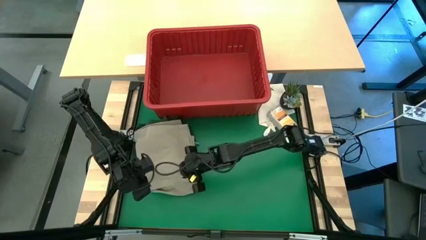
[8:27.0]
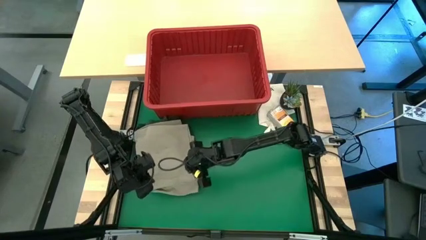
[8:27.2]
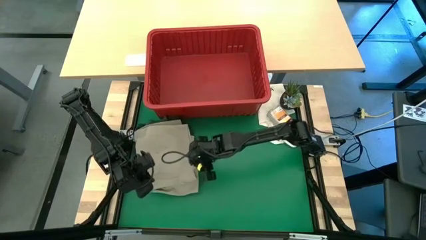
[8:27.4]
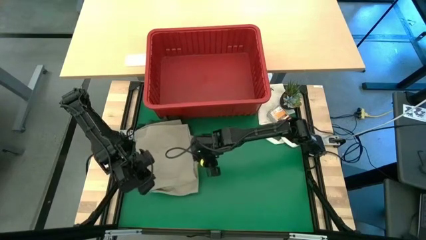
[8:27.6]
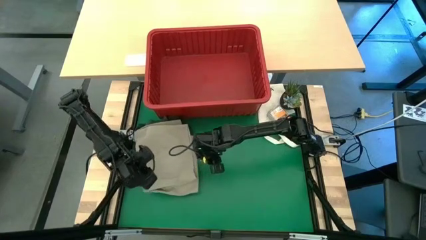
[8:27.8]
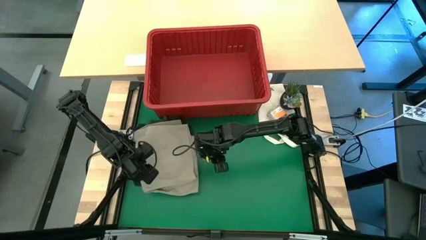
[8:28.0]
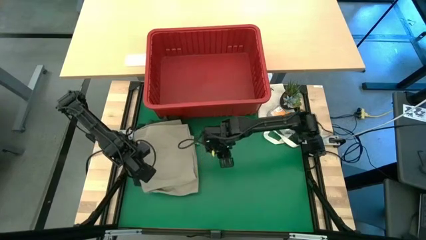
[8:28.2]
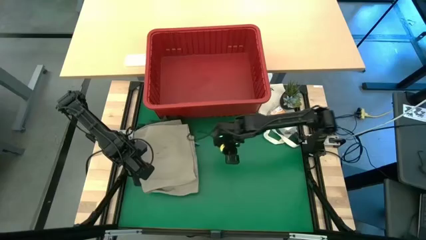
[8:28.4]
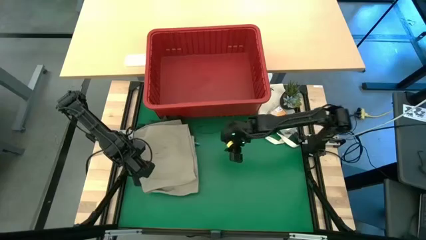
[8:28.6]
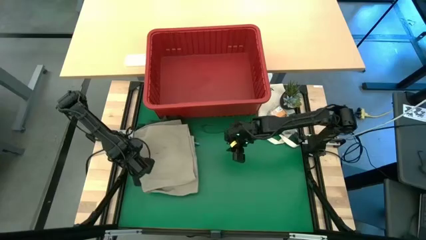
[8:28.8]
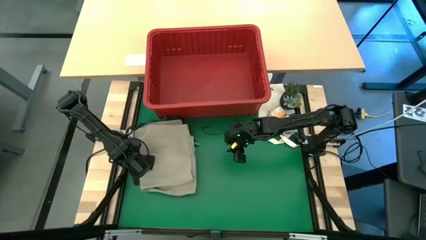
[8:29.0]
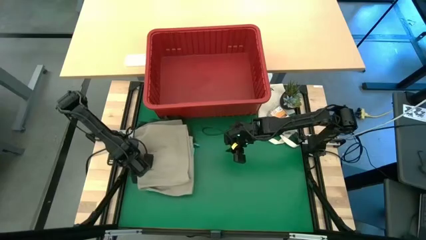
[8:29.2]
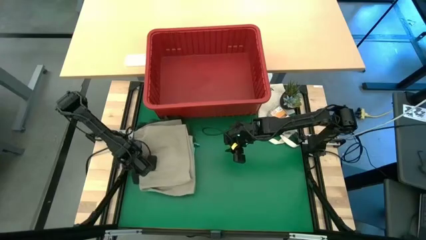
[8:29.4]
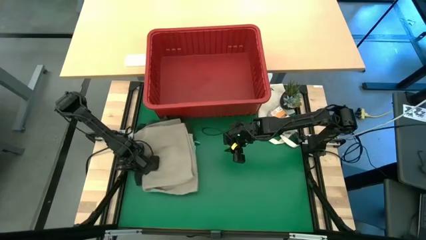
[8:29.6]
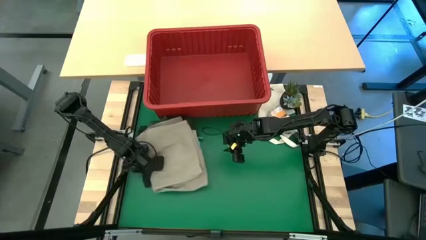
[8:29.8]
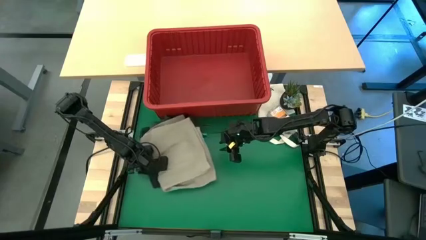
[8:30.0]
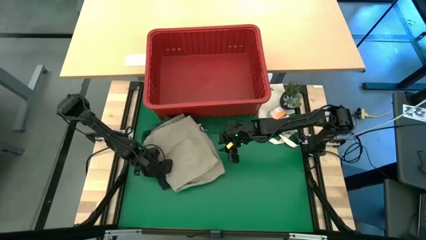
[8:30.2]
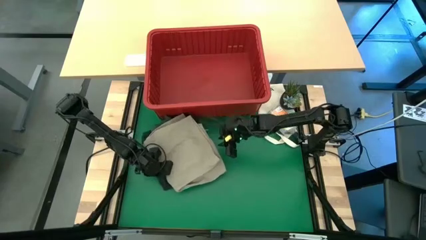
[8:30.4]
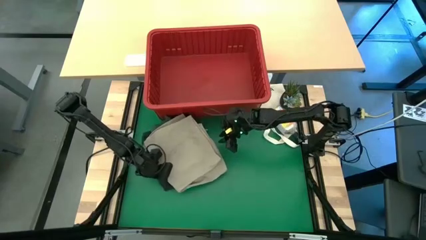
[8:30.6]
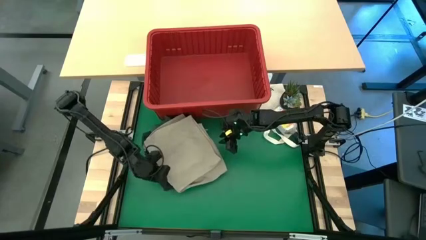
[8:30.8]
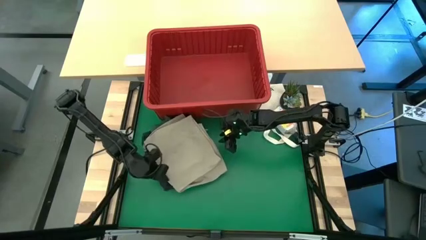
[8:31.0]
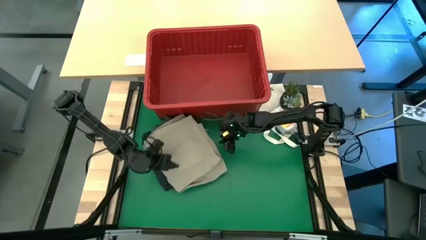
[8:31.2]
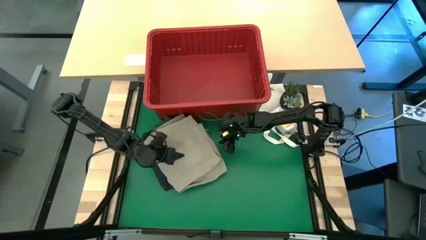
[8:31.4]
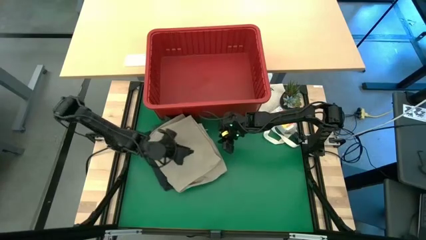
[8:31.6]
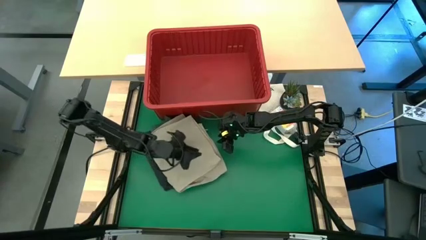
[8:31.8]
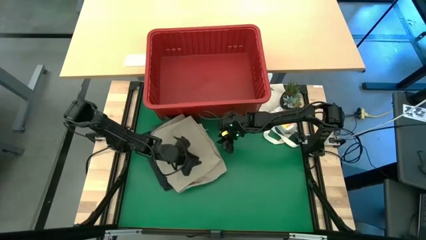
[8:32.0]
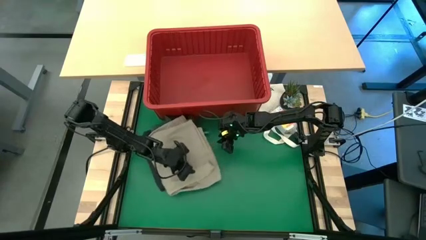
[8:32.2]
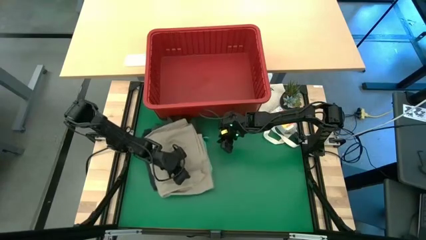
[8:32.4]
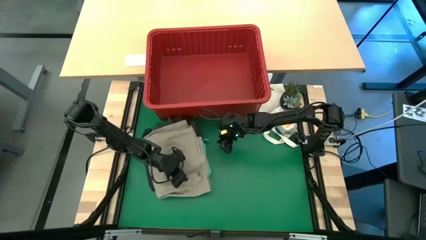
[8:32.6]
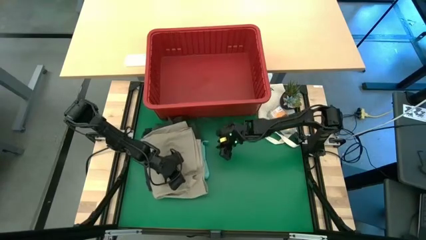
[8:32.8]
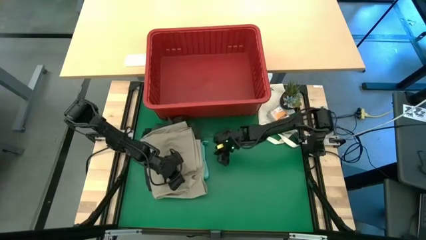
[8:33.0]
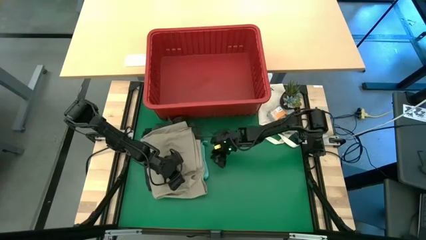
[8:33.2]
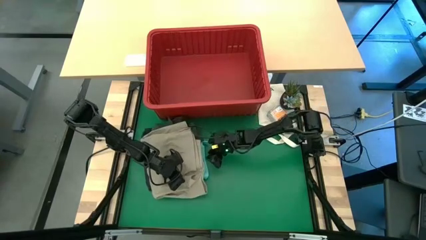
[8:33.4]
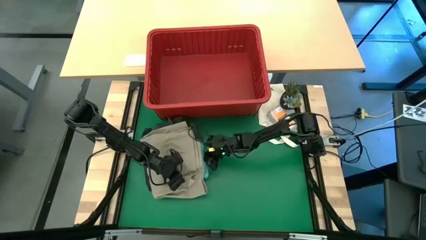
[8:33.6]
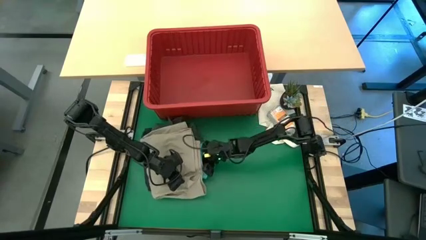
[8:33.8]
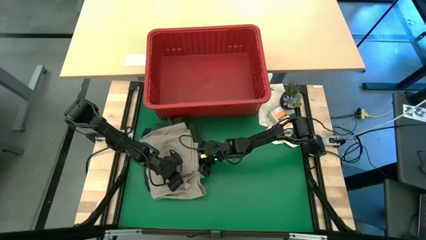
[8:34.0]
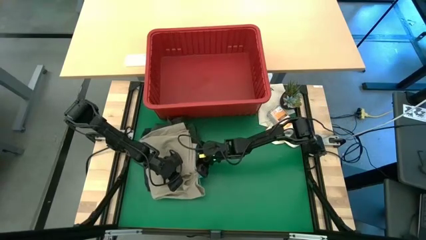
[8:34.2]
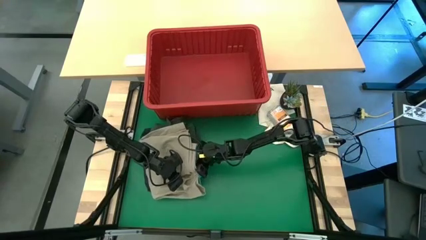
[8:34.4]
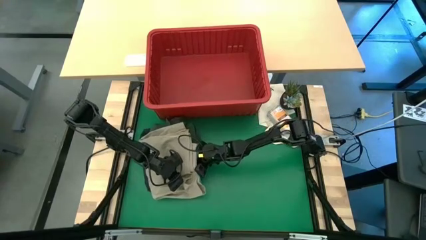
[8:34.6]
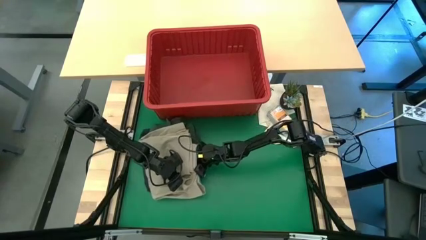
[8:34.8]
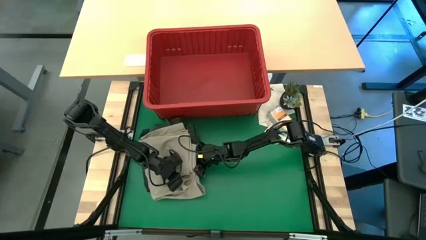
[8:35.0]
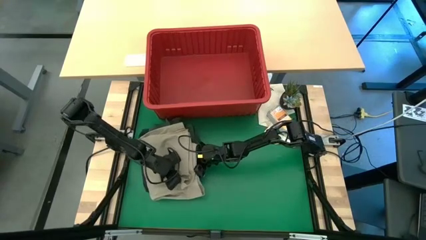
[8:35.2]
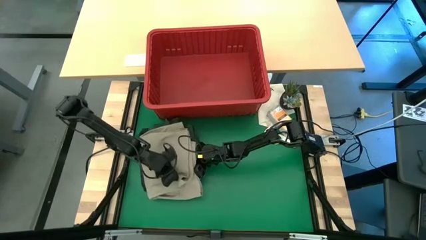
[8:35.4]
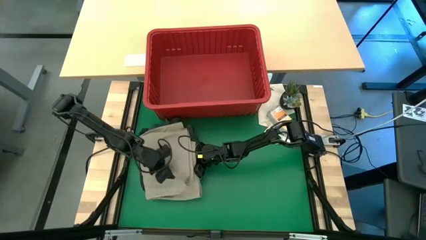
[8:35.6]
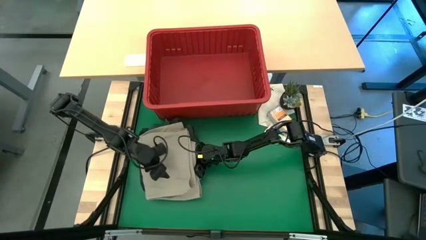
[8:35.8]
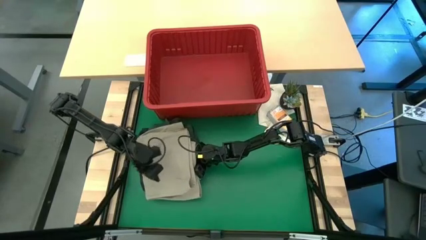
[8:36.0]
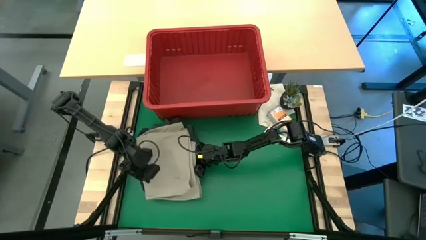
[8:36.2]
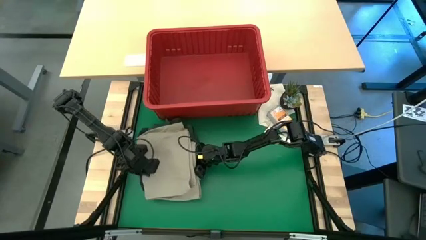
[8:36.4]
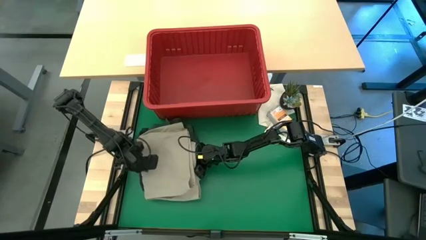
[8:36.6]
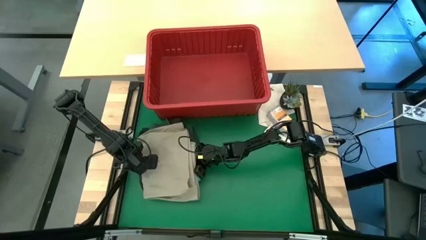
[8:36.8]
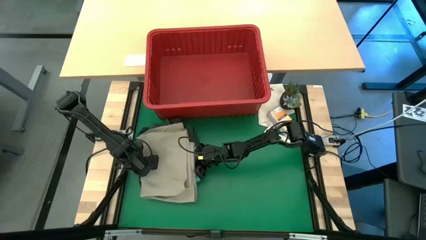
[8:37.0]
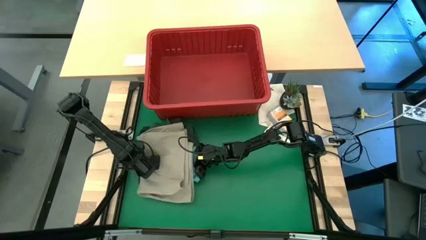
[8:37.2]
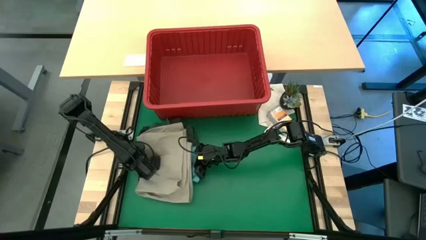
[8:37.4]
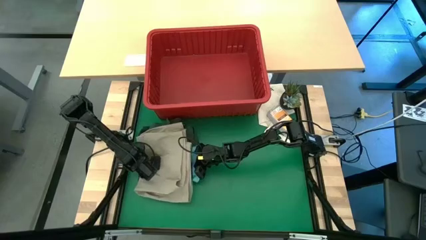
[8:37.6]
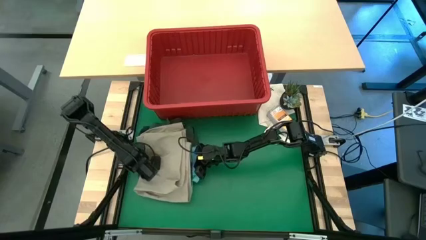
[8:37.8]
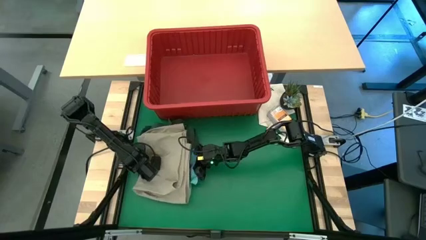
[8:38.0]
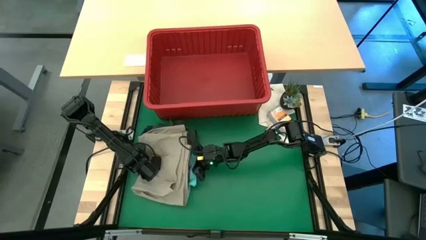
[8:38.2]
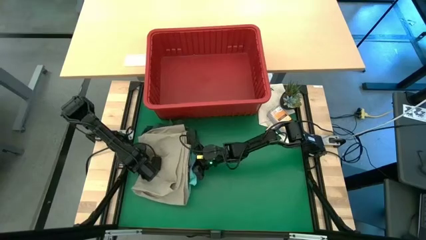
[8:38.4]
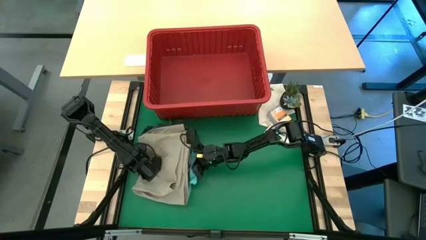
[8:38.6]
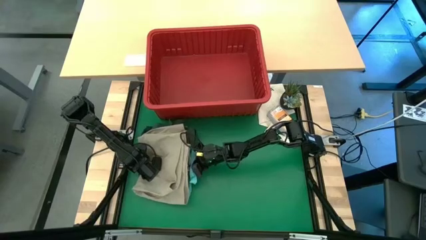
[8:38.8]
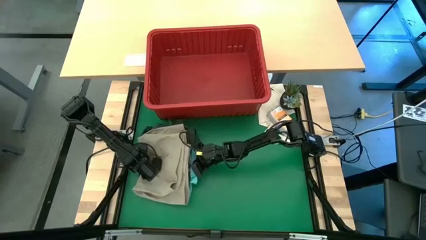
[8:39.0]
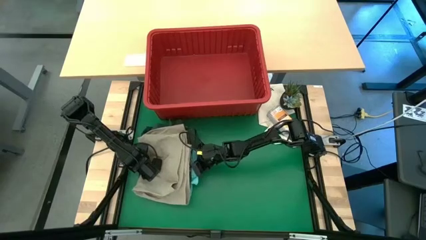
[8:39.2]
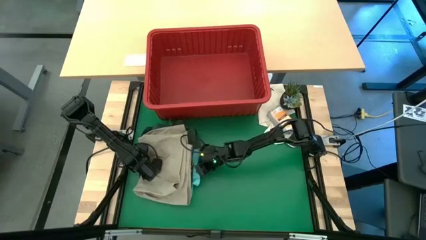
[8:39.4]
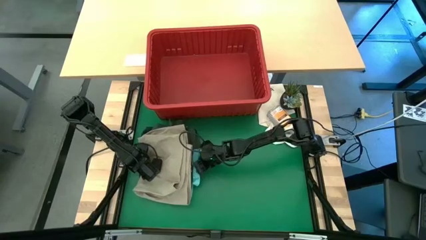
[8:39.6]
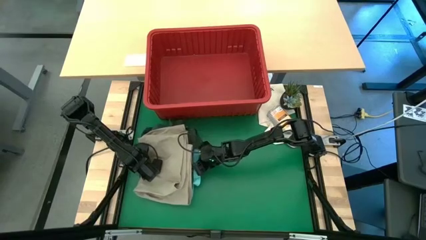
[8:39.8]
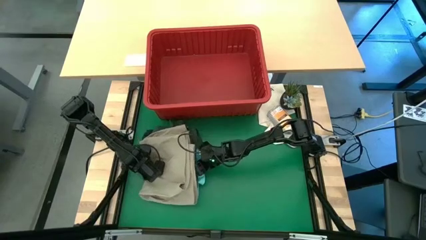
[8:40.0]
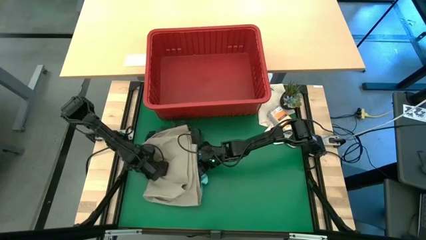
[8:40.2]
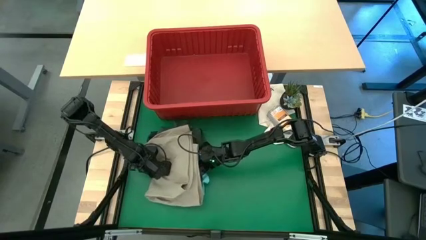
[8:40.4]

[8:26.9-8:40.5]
Task: Fold Laundry from Bin
Put the stacked clothes into the red laundry bin

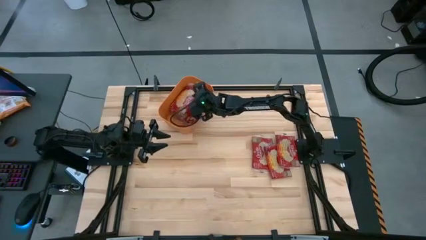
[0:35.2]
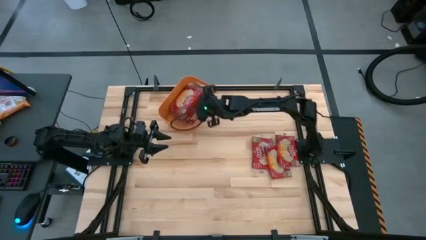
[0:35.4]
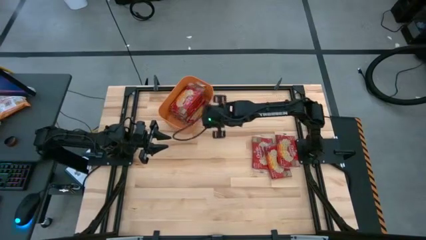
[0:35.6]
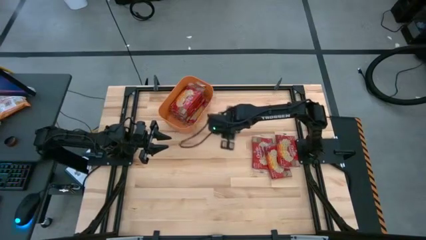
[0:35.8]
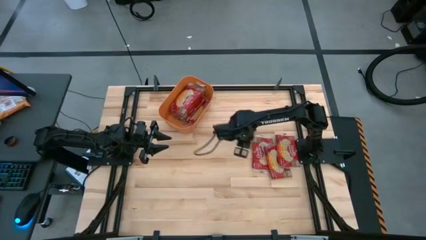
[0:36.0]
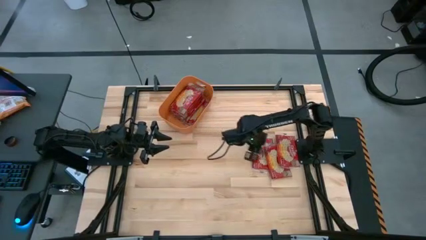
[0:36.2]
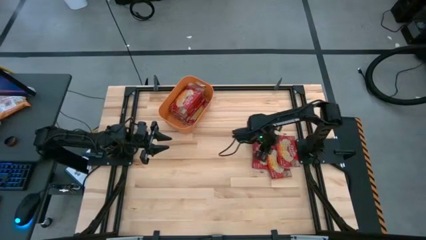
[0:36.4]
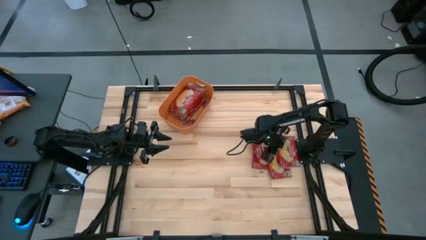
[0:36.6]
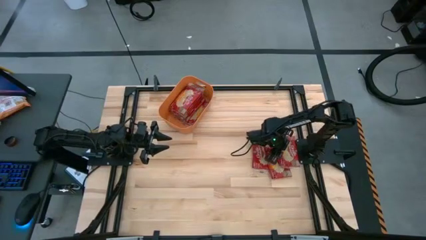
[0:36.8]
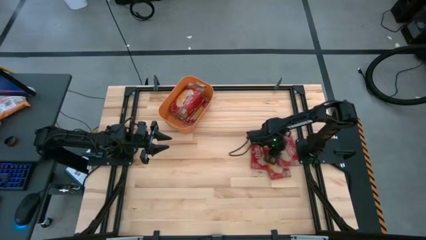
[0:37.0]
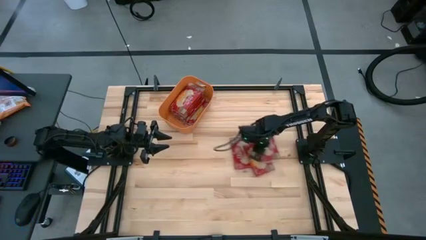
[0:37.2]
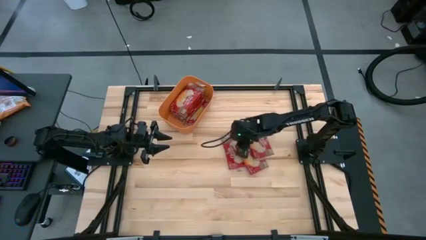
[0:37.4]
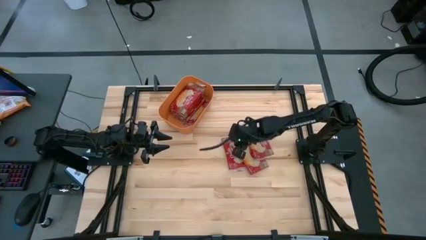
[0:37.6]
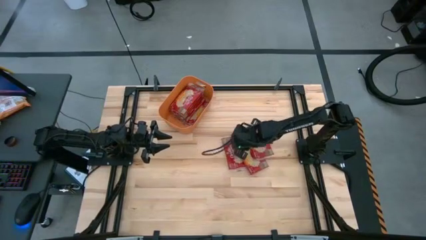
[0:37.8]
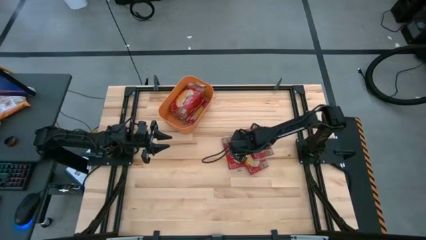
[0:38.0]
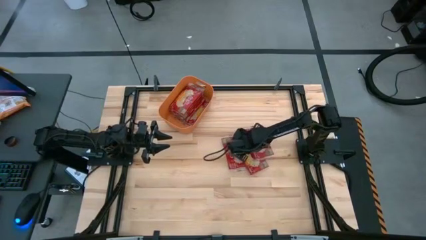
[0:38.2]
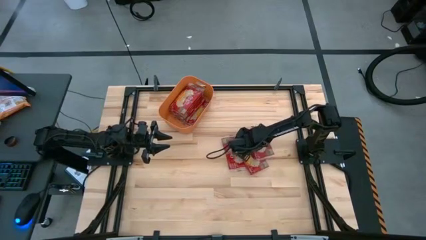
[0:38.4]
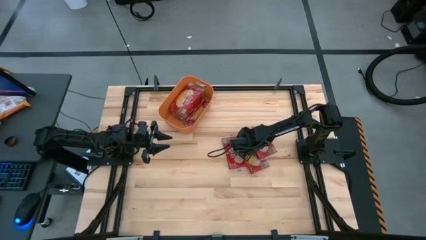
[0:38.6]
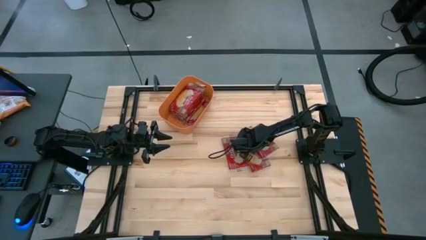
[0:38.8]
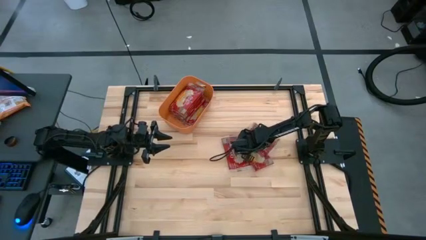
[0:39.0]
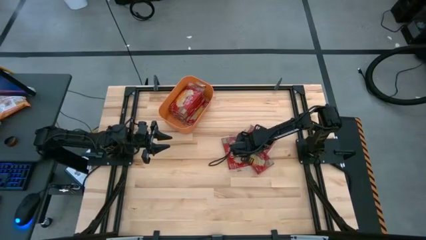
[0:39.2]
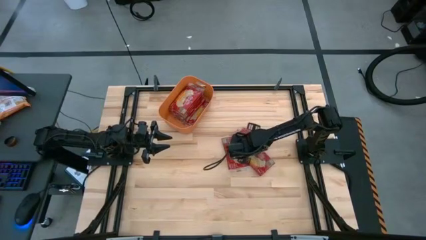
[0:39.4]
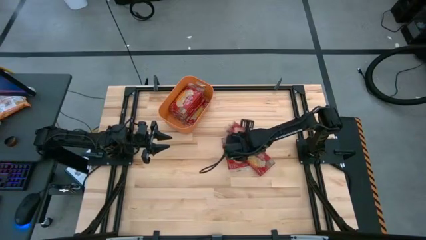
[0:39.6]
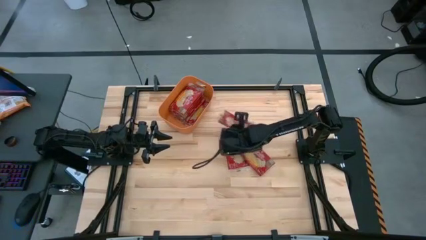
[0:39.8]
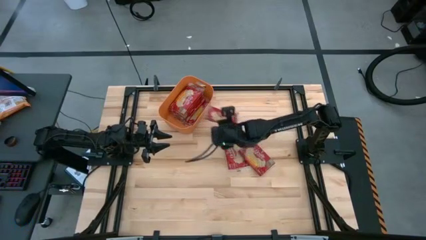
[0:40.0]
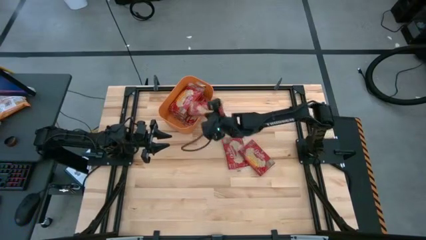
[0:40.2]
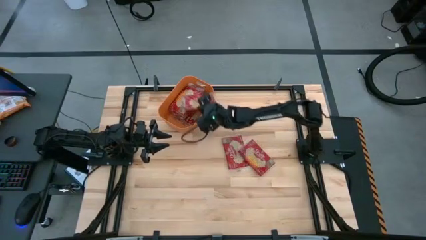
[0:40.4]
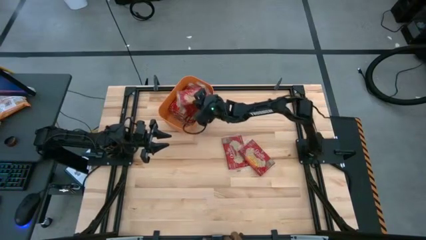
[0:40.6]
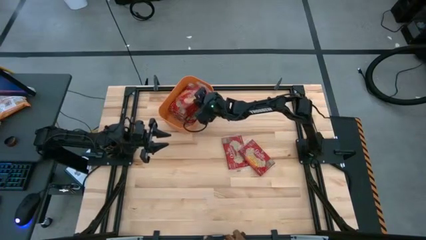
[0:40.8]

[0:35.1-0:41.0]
Task: Sort popcorn bags into baskets
Put the red popcorn bag into the orange bin
